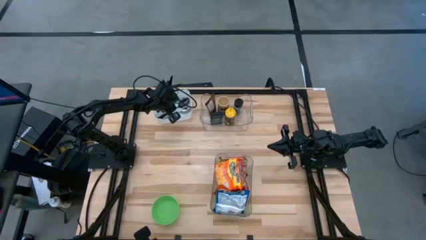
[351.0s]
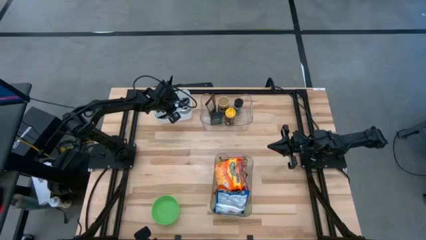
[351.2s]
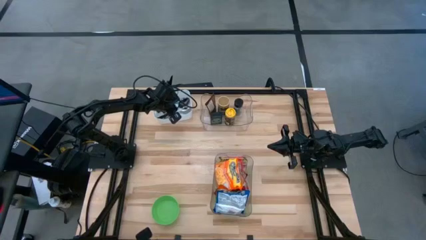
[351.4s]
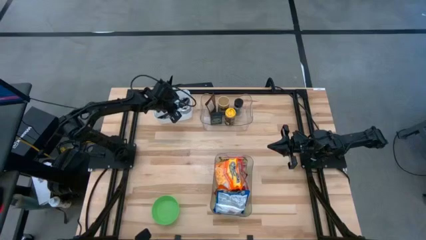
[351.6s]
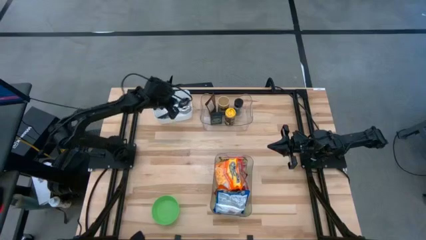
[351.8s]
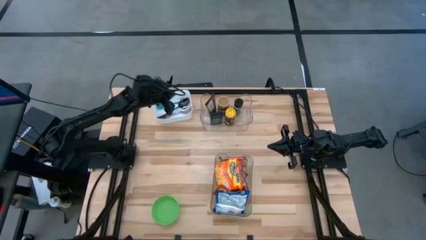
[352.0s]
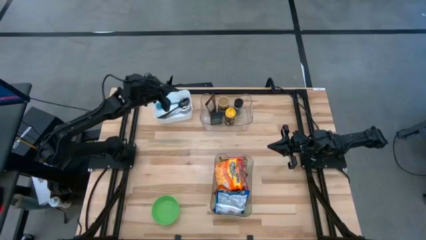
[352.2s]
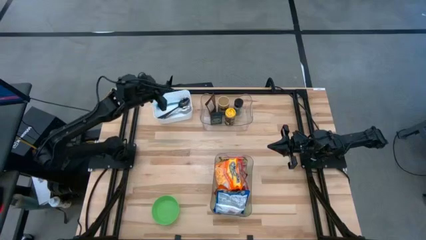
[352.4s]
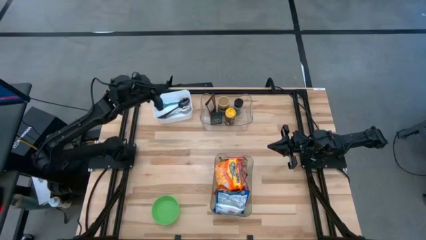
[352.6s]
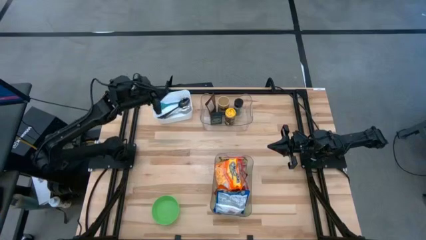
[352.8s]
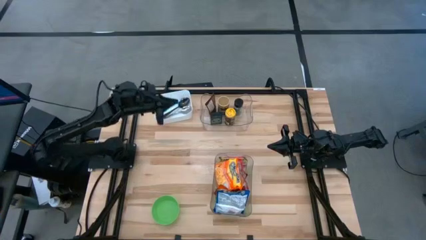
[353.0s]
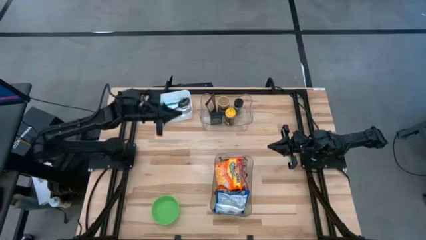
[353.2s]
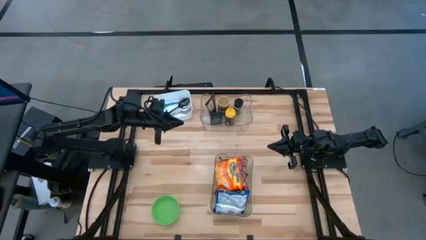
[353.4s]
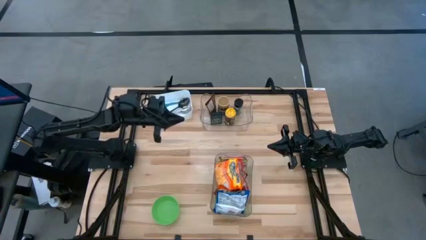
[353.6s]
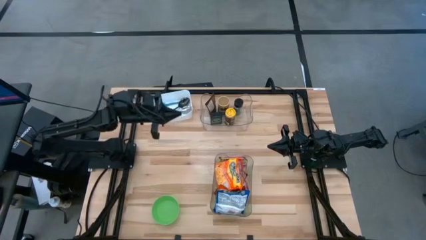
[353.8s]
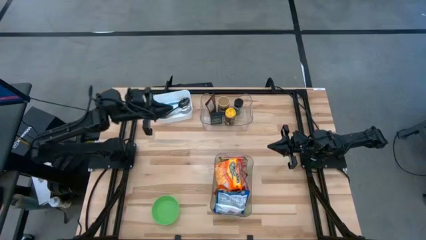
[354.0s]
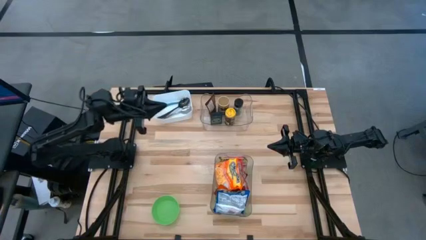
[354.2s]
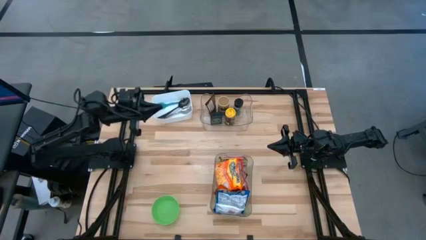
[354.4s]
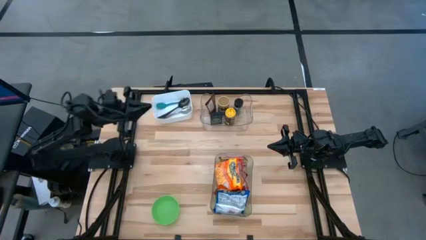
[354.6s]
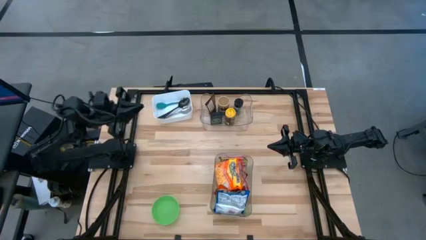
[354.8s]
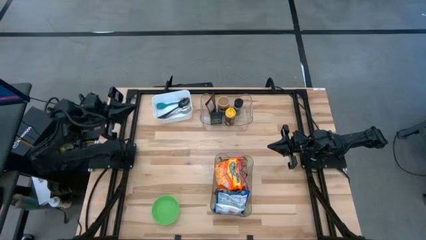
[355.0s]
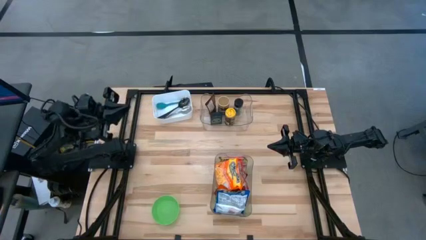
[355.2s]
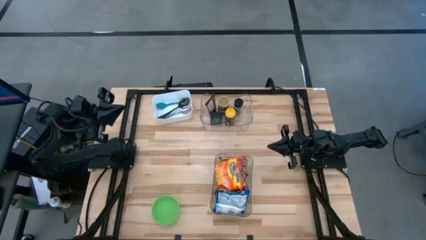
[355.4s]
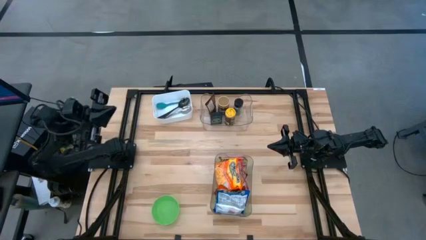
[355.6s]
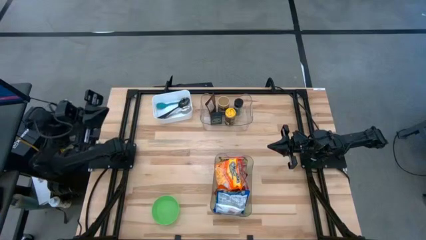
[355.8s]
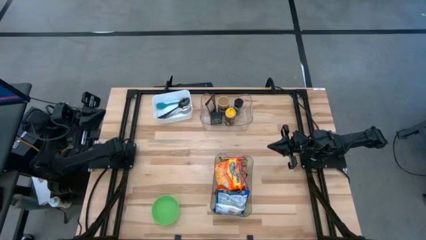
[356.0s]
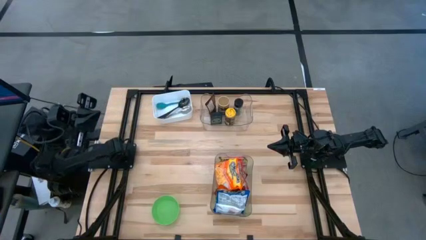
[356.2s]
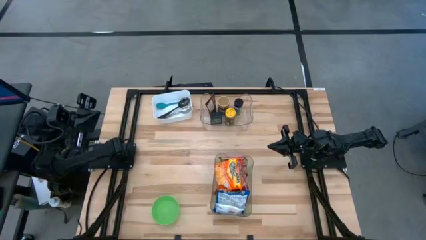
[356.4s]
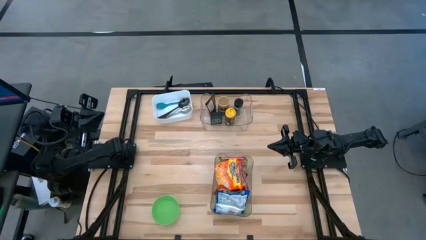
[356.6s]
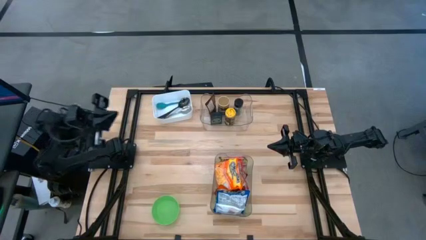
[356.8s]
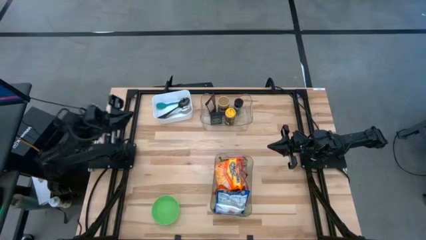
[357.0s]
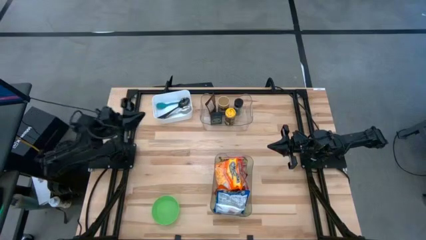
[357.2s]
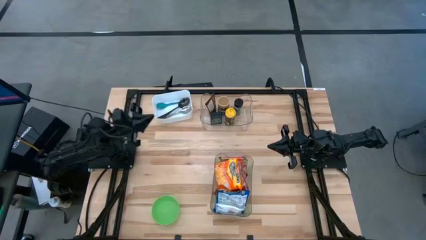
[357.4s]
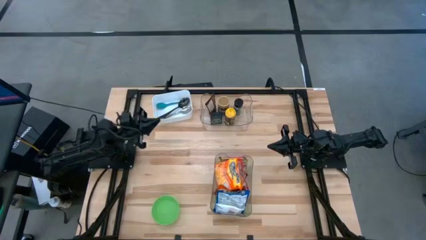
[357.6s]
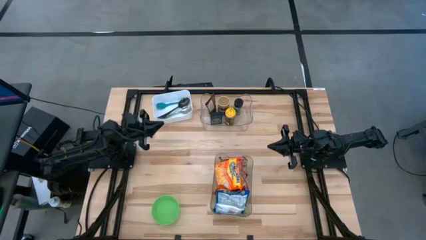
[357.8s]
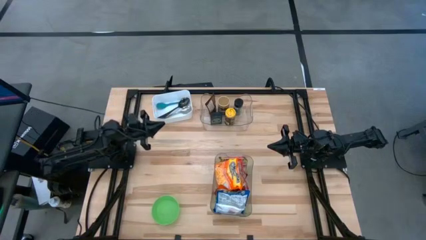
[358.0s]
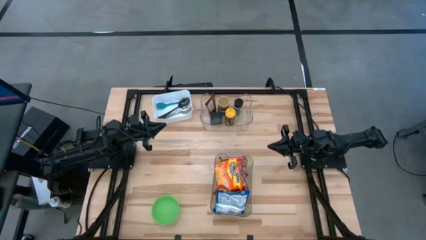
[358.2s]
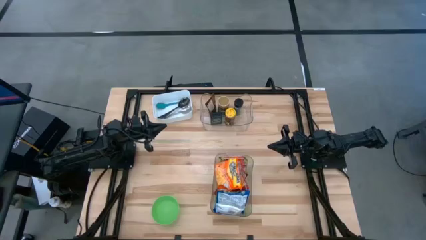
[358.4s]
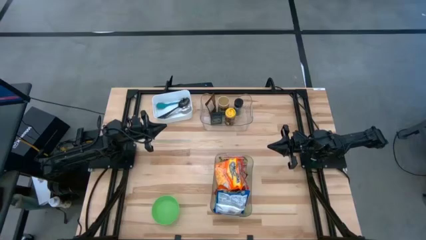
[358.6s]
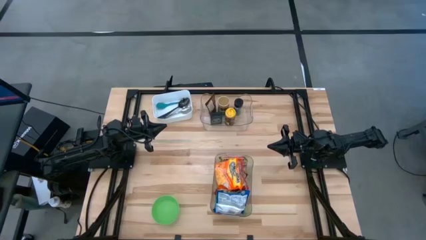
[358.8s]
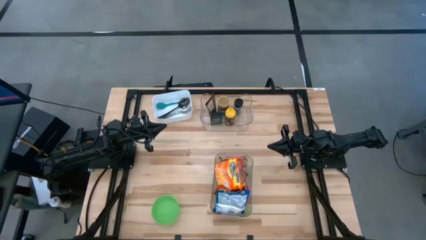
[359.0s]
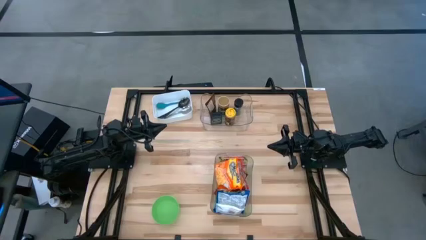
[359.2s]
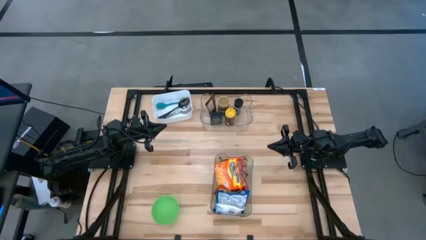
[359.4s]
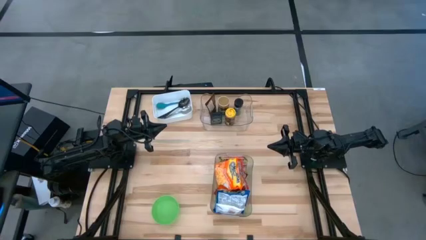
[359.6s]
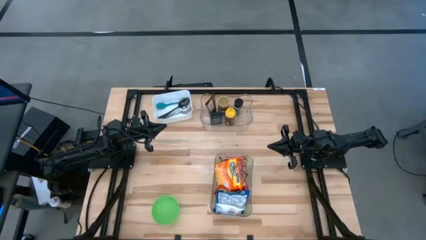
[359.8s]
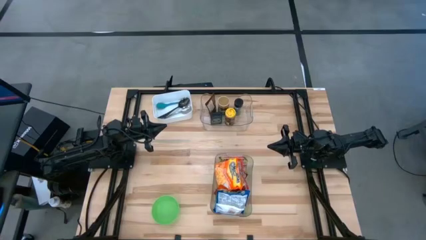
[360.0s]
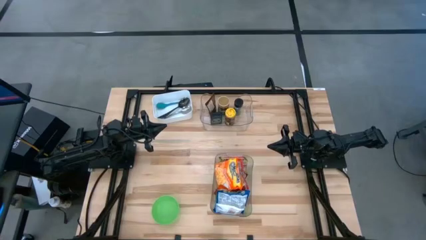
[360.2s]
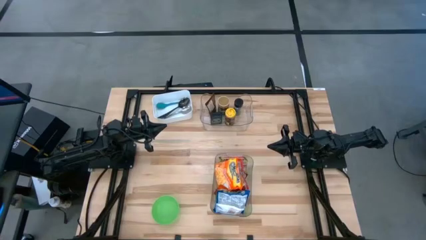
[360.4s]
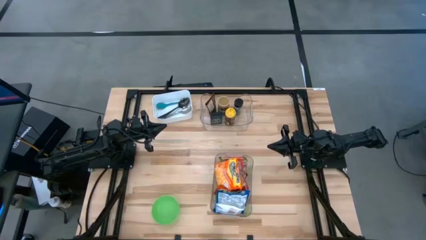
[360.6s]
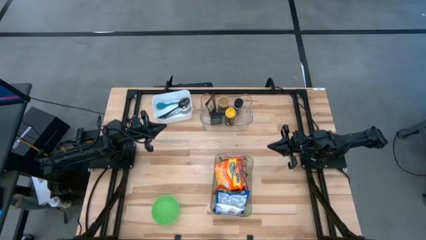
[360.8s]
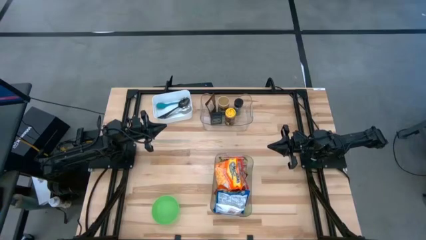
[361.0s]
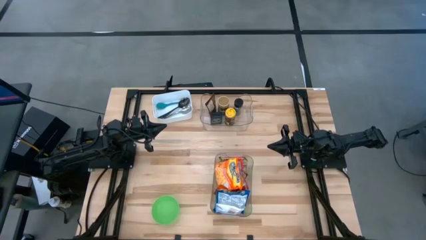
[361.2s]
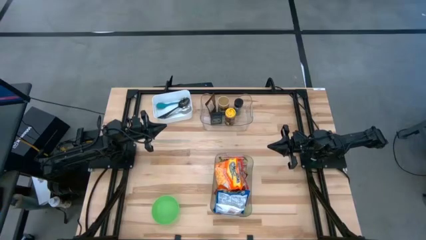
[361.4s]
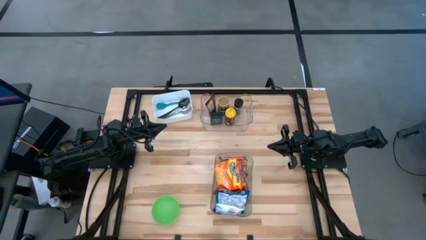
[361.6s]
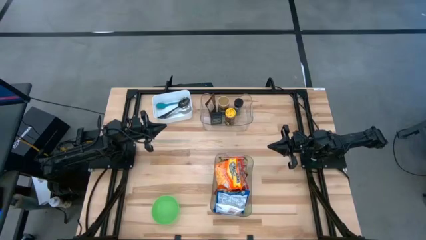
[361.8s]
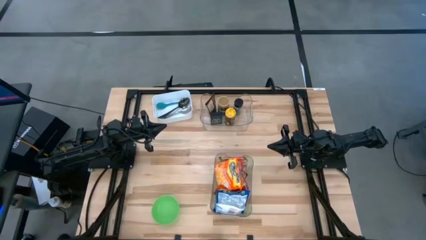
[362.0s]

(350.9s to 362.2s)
Task: Pick & Place Food Item
Return to Home Position
